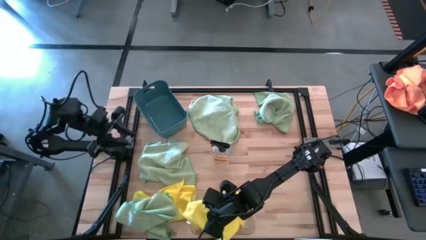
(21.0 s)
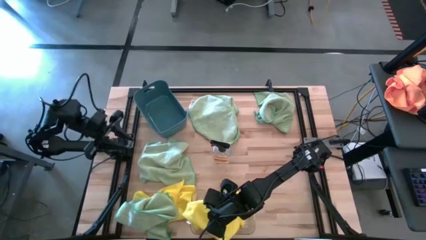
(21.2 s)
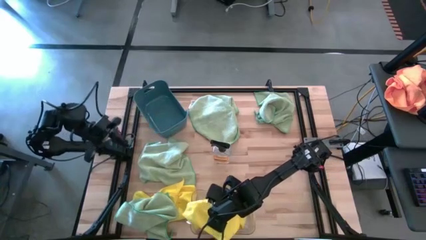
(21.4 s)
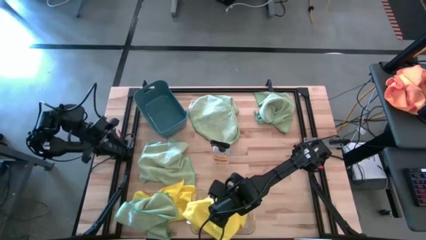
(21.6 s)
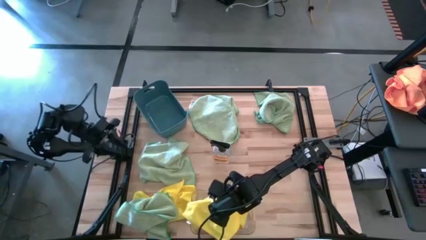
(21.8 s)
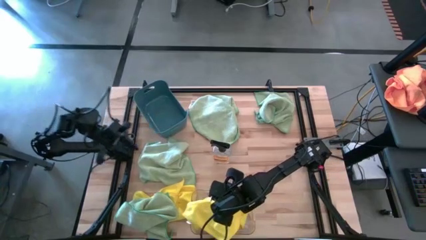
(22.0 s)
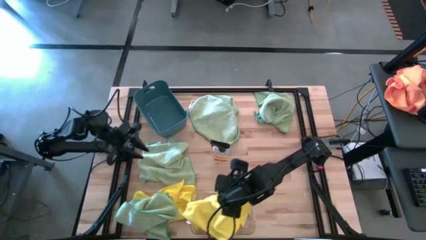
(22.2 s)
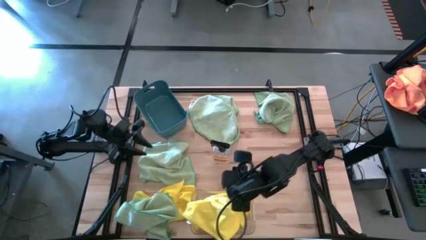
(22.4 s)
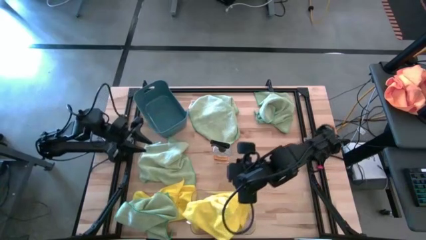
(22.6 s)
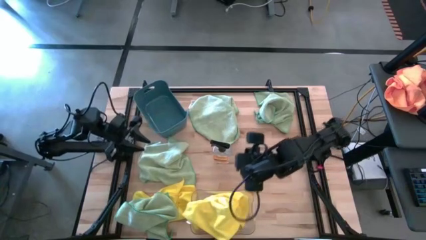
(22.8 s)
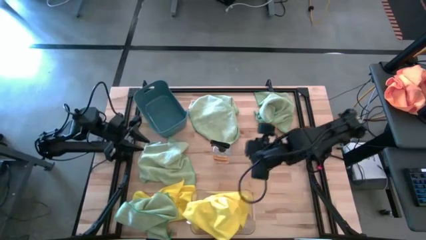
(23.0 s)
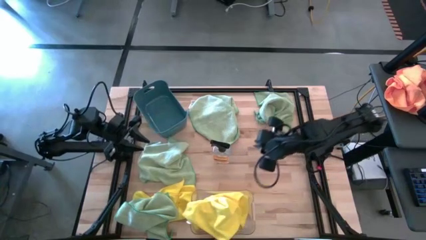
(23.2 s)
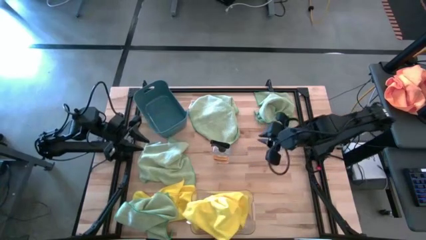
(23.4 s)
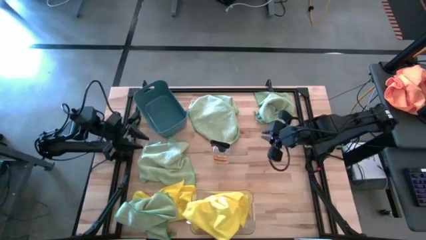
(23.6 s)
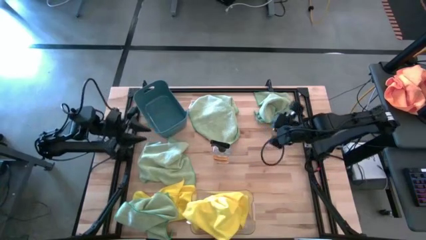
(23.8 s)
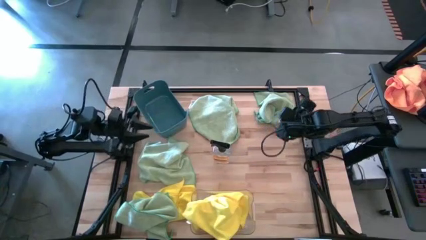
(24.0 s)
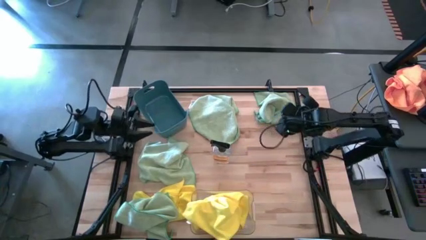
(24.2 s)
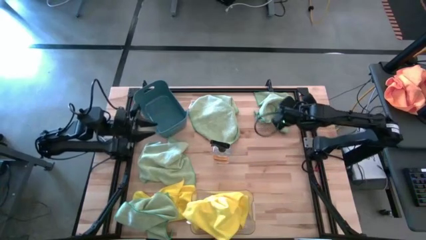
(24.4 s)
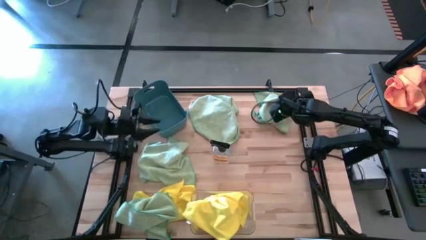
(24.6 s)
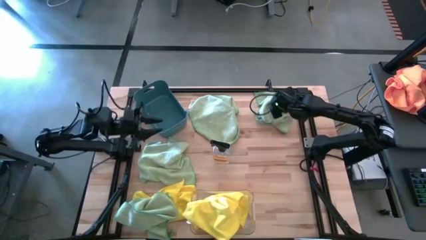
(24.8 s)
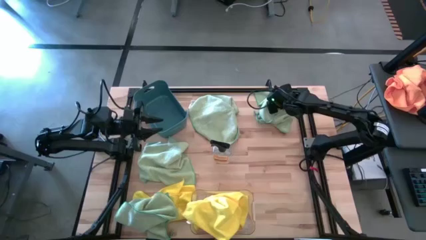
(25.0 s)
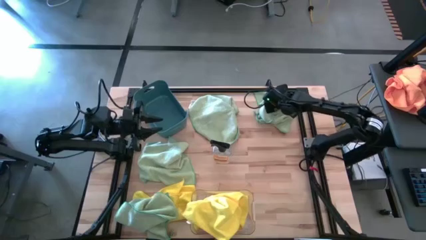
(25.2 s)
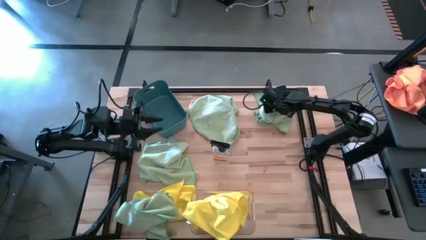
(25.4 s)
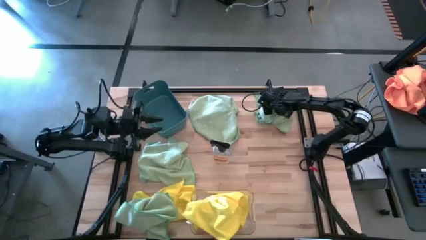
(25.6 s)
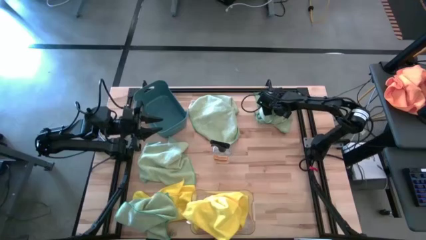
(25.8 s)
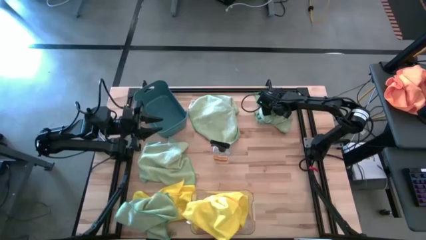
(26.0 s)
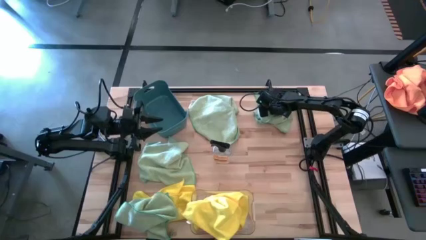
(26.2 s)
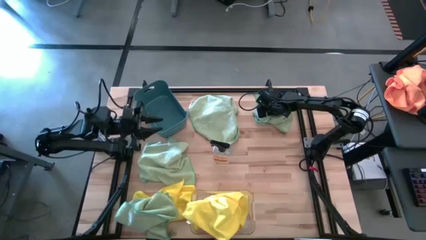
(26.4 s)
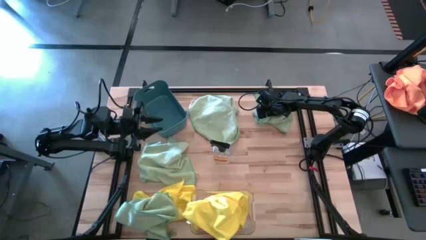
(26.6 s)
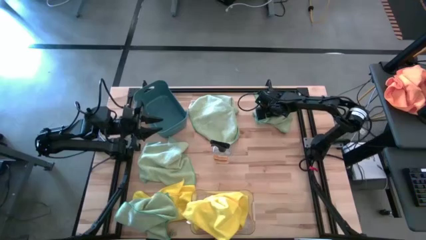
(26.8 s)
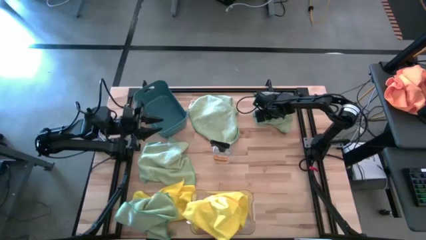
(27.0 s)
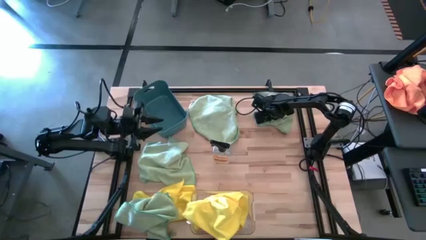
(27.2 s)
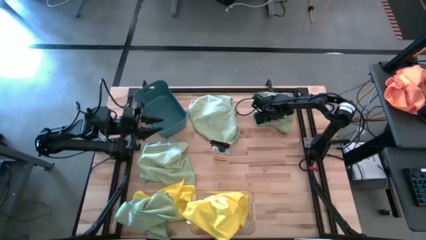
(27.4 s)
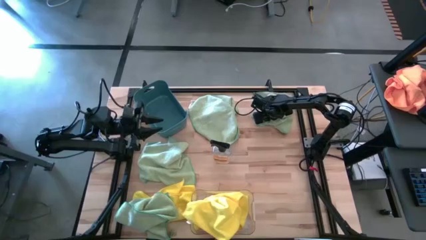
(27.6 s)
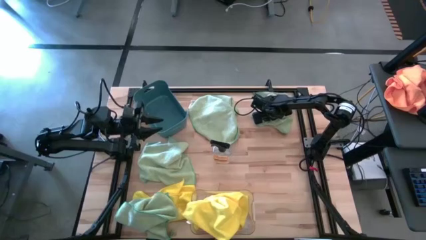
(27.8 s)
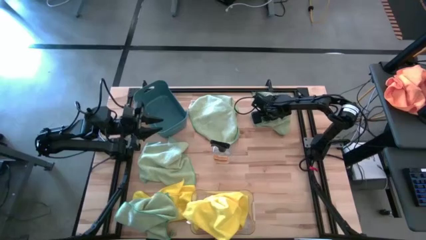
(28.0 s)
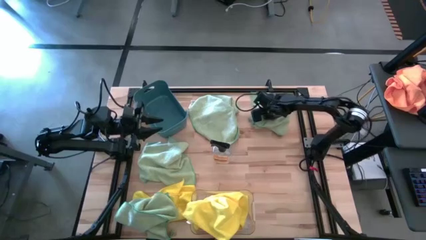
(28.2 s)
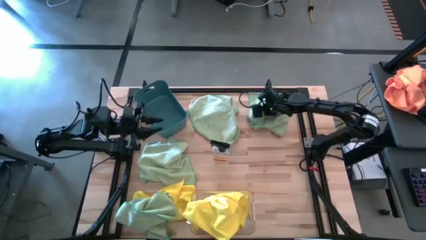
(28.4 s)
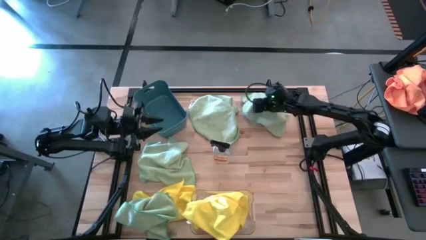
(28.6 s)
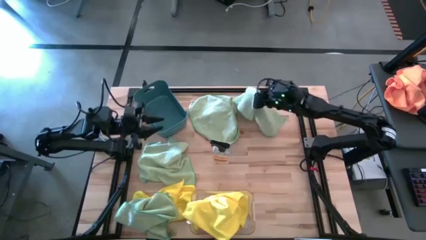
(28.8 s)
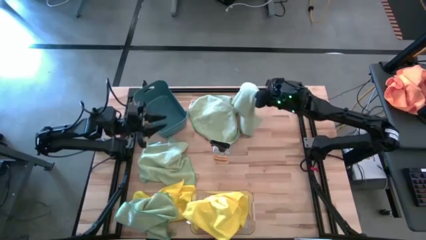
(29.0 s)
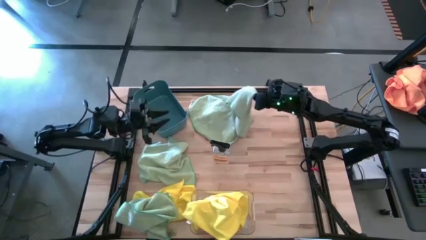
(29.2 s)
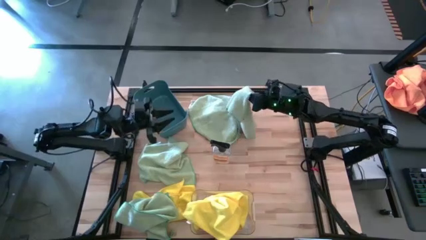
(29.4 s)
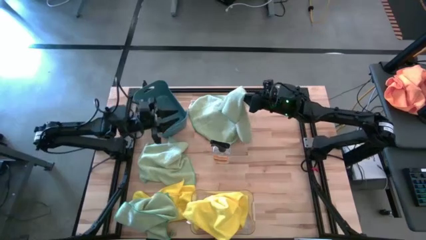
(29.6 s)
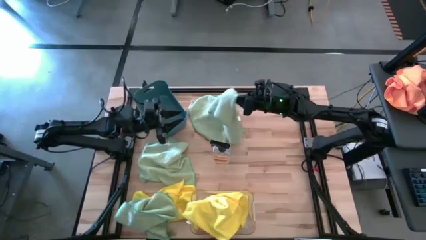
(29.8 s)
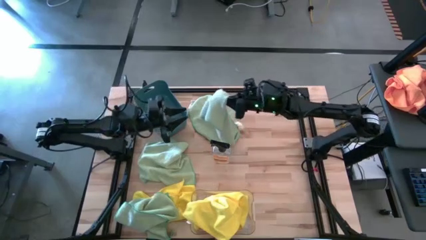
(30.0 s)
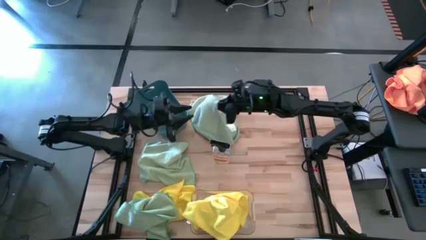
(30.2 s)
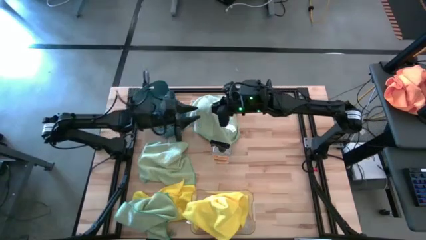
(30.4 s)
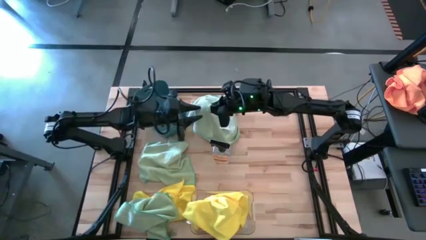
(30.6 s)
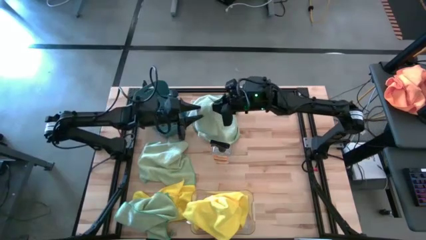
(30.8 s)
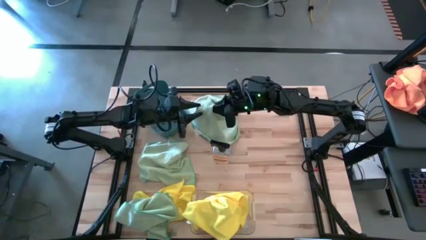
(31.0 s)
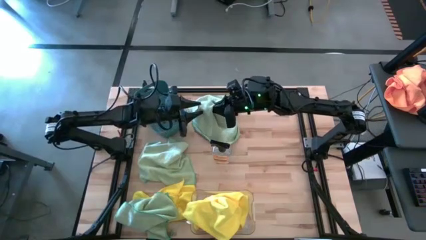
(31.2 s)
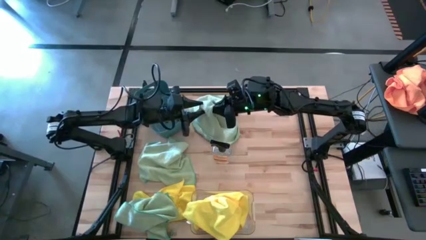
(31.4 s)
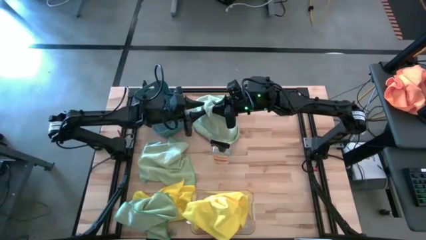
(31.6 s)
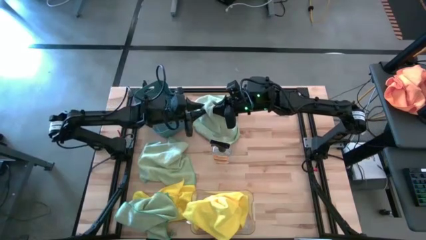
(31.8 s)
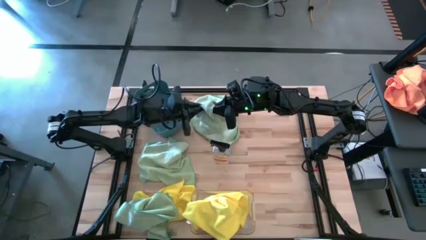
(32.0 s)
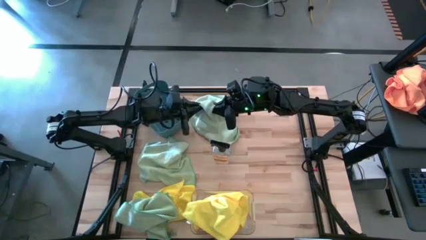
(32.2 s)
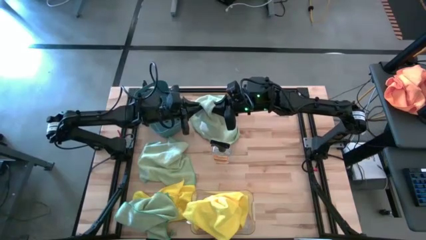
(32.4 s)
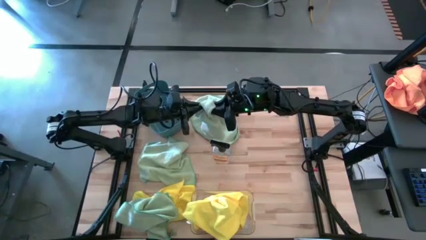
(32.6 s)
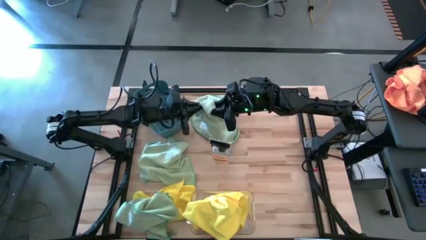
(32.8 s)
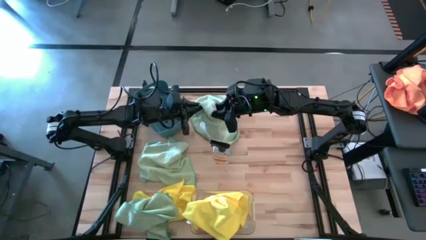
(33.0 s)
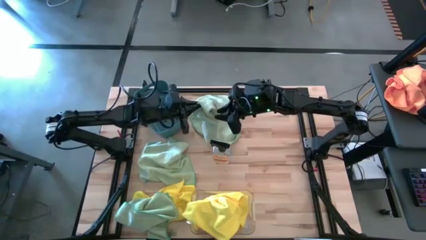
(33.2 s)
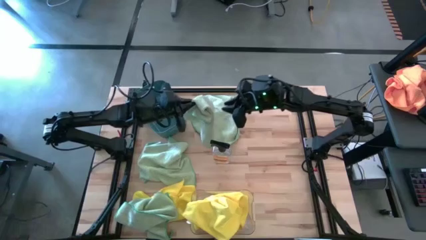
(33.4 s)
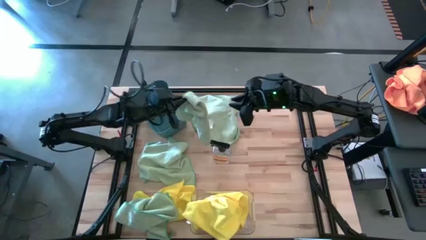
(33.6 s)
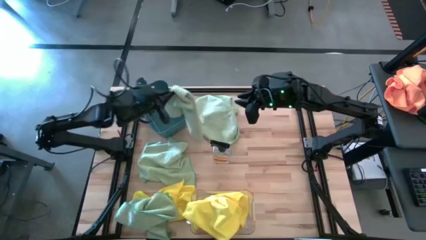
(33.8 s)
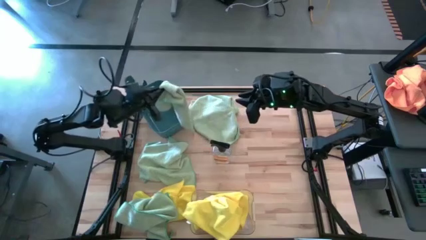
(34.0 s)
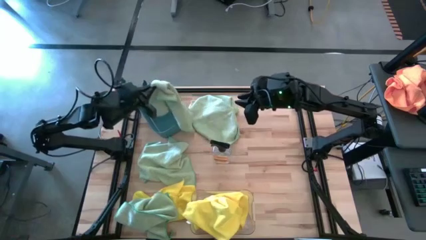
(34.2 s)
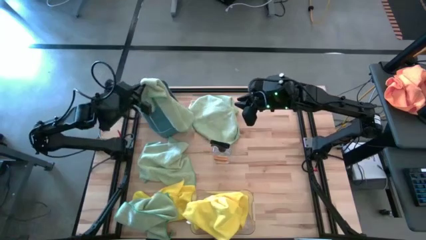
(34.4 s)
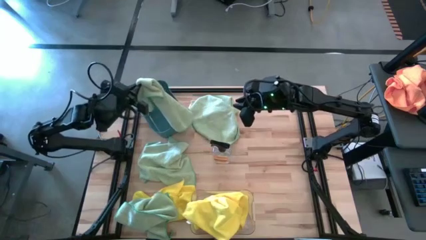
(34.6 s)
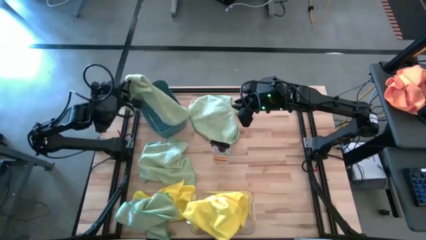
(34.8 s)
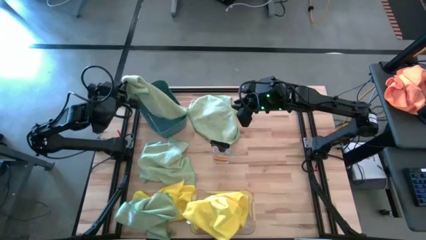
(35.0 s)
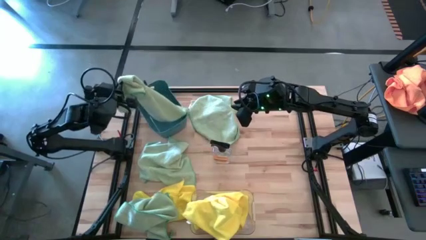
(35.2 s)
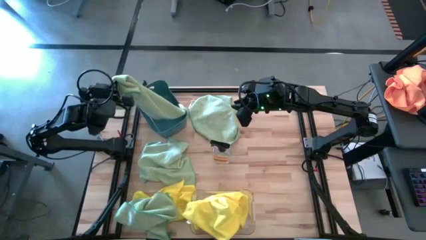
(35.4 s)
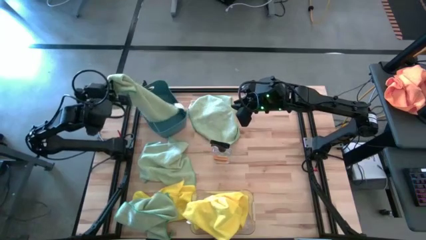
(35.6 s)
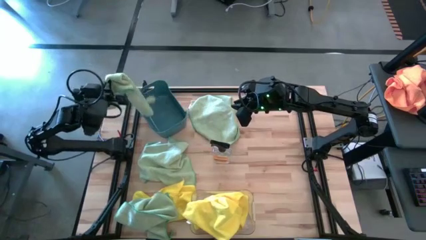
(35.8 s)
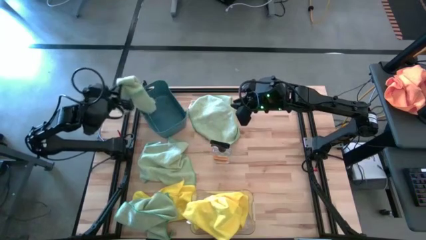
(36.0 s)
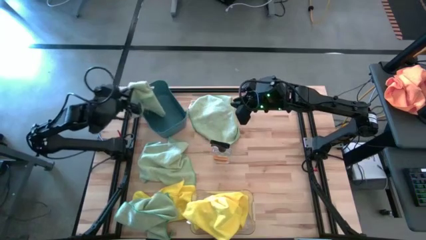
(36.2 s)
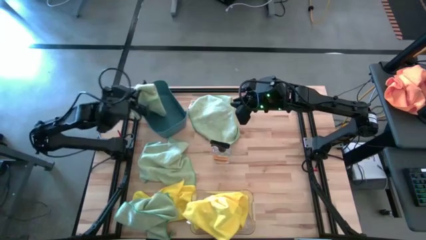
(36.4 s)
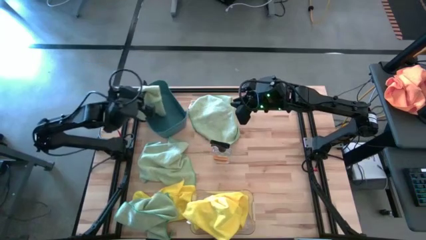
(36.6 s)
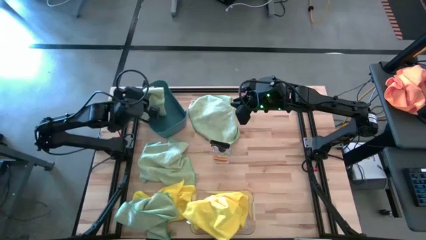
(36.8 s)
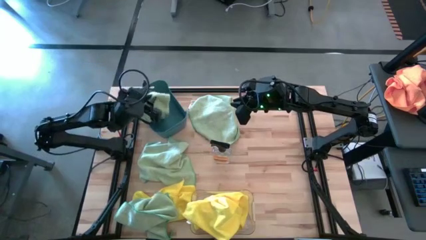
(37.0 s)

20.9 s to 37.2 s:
Task: Sort microfiber towel by color & place in baskets
Put the green towel into the green bin
